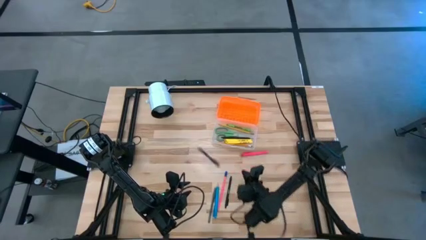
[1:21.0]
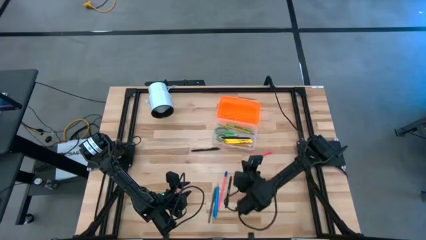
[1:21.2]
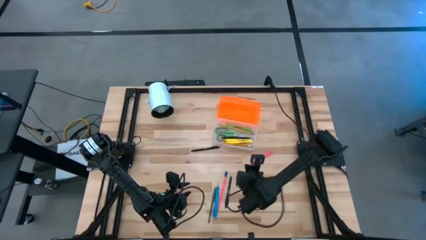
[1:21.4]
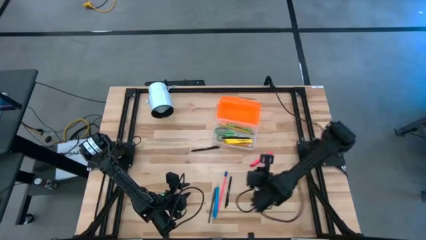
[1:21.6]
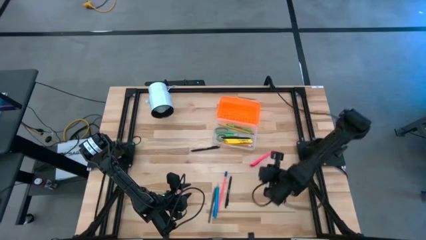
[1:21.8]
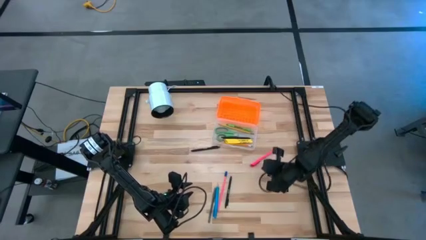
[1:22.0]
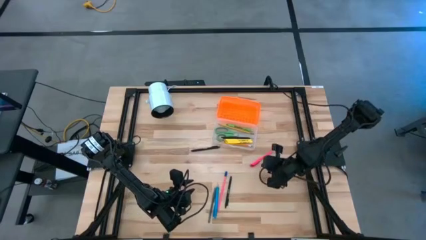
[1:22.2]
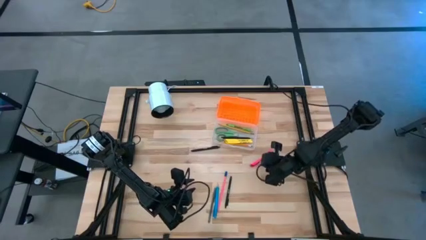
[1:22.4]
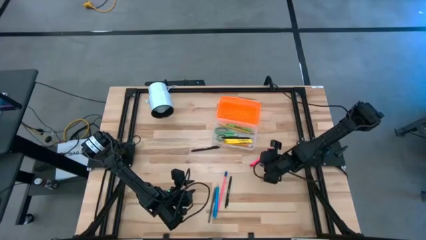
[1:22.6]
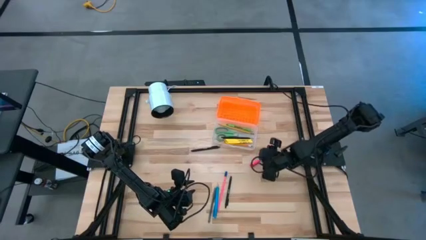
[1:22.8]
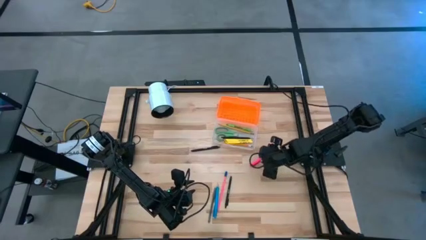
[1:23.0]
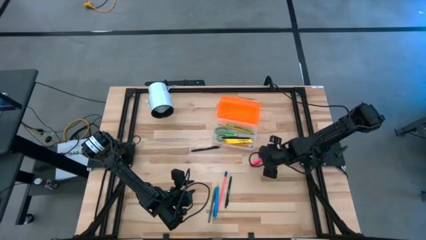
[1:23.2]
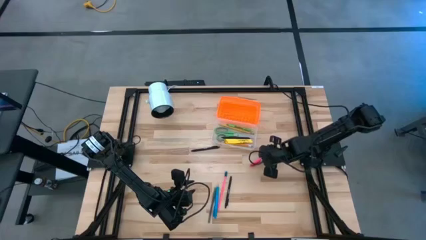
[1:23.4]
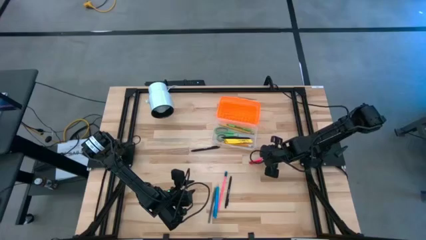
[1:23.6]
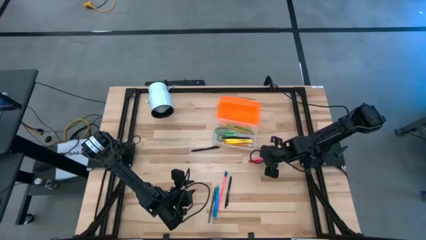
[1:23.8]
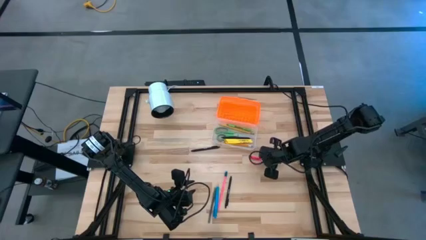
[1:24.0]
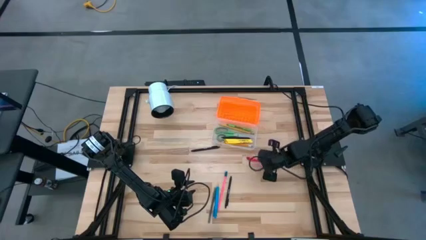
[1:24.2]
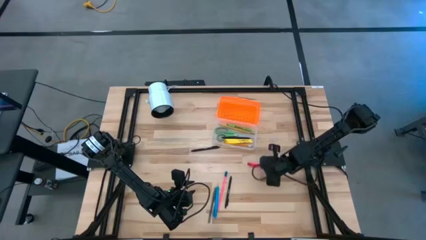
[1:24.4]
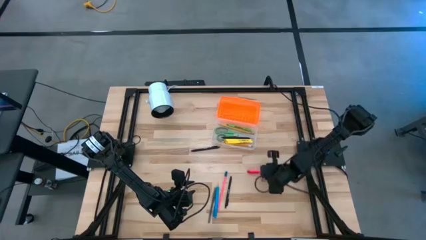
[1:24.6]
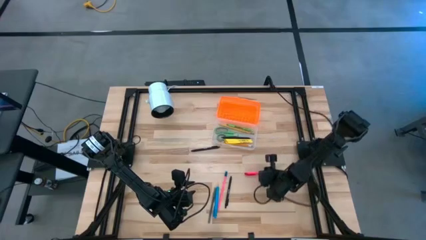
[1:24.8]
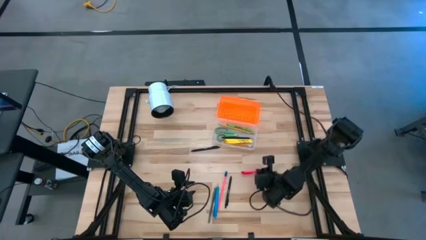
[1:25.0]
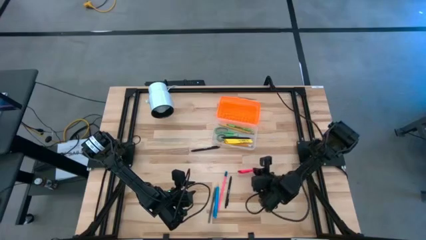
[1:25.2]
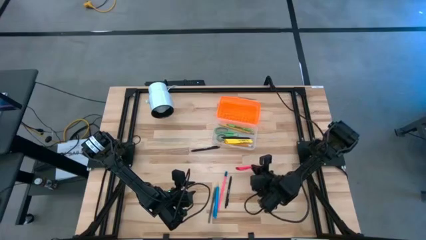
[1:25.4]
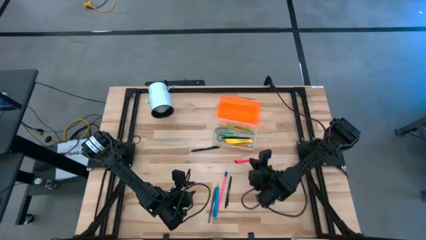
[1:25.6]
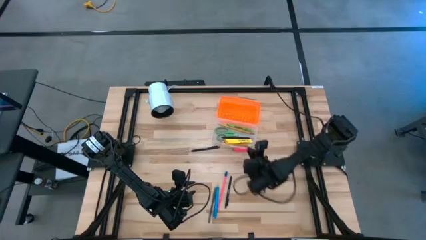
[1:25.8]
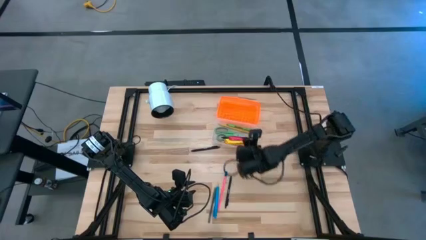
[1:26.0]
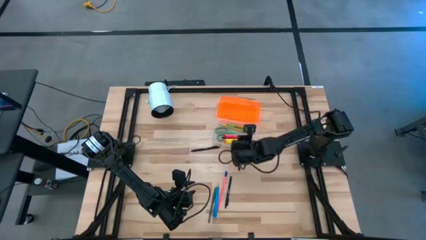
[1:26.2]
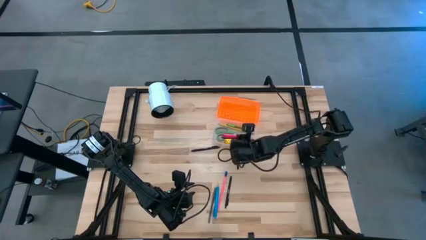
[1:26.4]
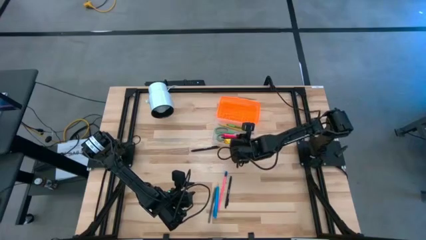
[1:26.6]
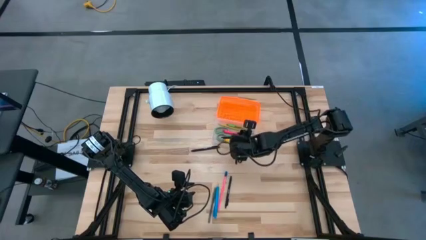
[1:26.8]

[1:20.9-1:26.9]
Task: Pick & place school supplies into a supply box
Put the pink pen into the supply box

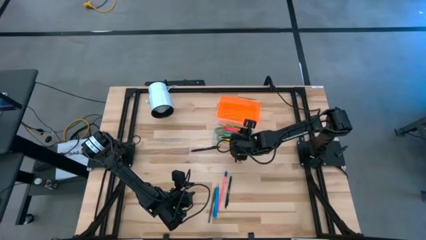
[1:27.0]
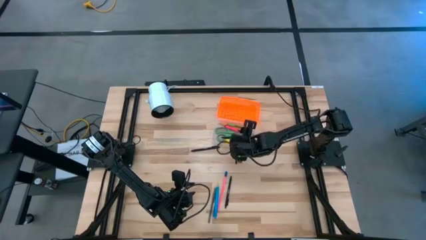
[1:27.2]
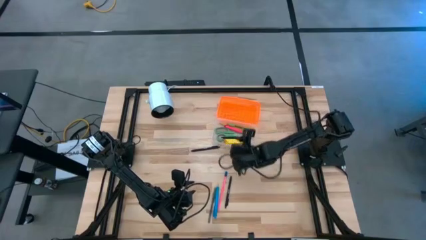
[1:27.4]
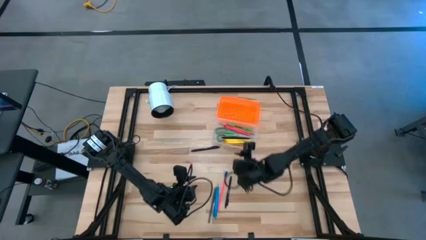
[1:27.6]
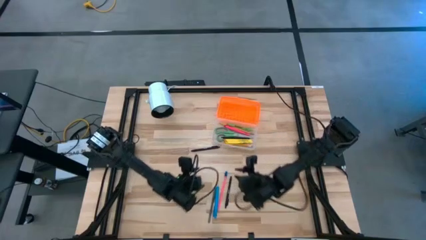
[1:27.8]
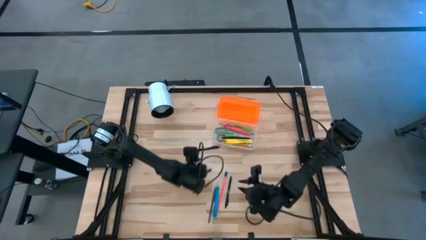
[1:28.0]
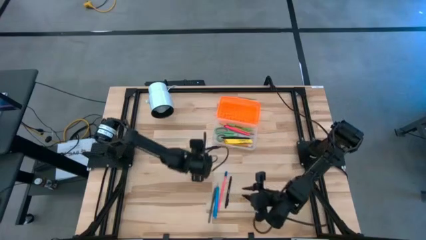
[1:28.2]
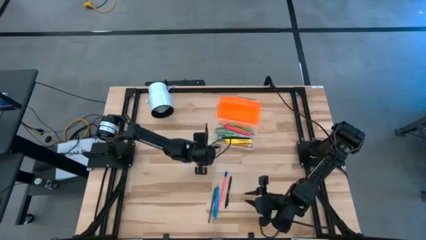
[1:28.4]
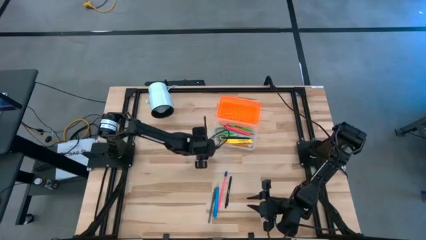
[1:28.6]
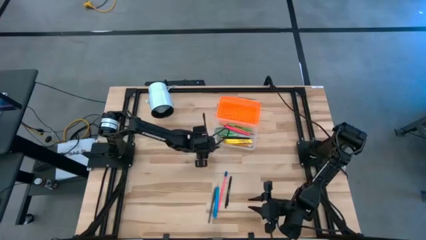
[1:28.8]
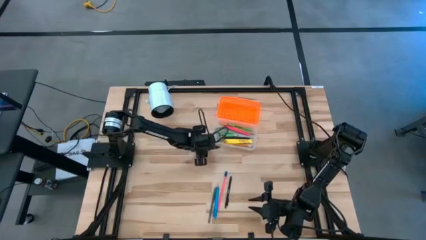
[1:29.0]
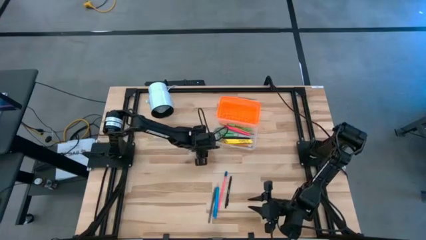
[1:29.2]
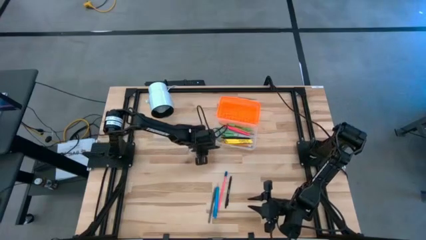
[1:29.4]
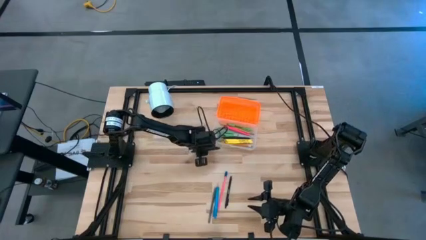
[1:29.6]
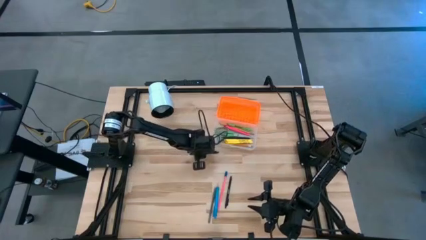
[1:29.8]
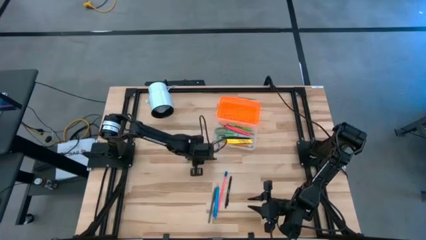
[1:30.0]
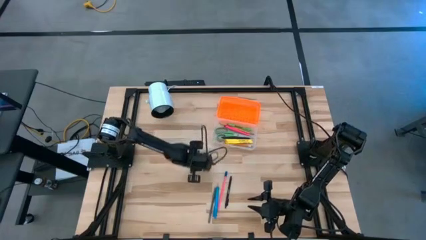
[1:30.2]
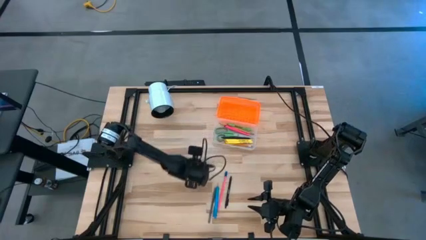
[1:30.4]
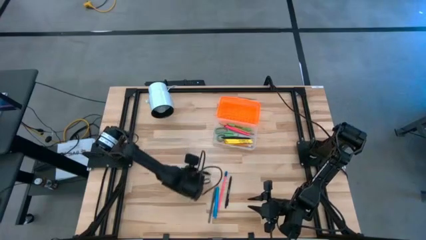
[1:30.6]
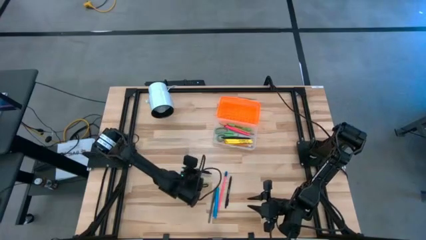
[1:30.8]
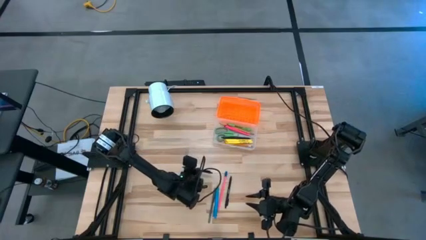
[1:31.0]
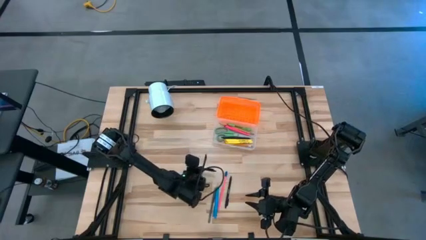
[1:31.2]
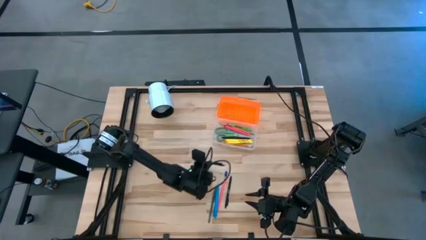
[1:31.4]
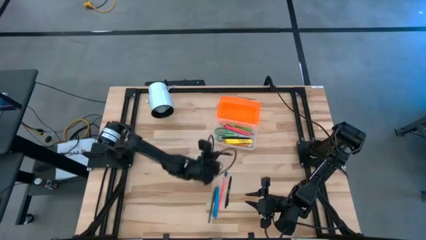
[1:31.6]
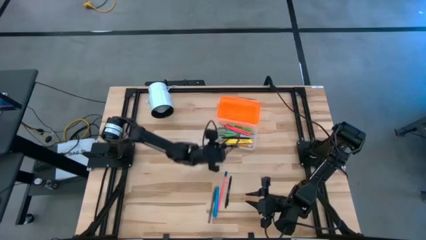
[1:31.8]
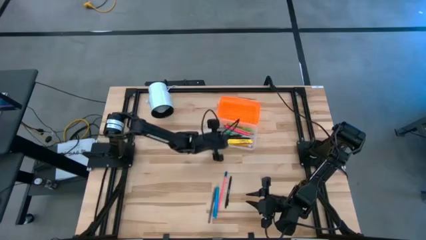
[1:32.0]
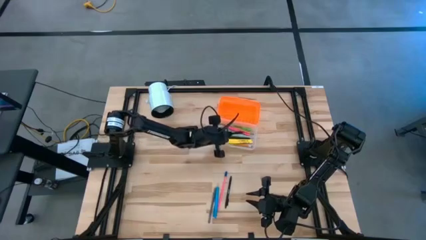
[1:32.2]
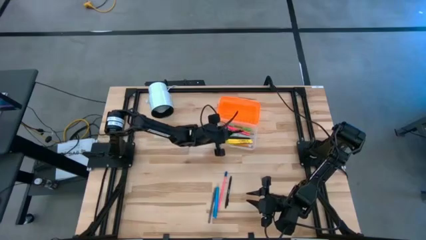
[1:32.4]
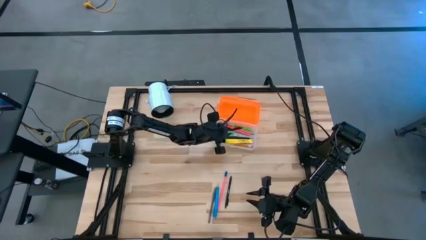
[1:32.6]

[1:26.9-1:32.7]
Put the top black pen into the supply box

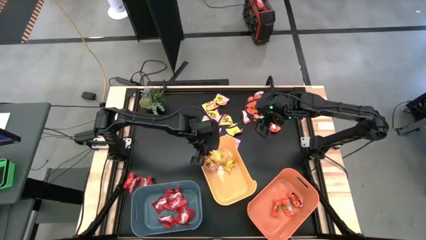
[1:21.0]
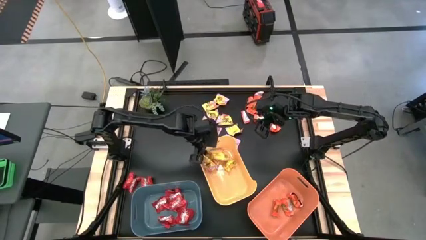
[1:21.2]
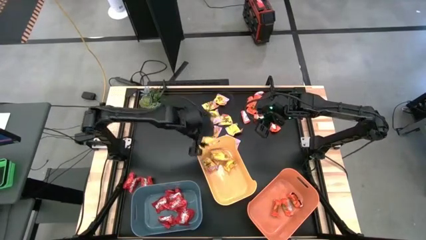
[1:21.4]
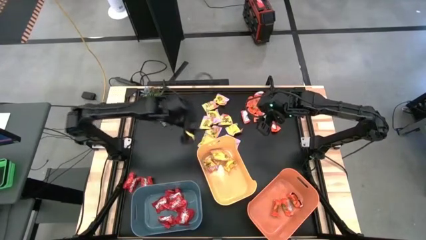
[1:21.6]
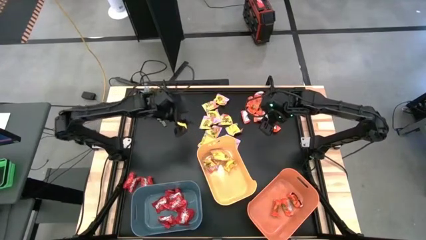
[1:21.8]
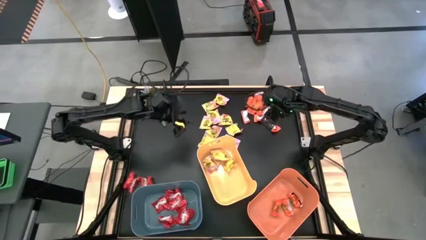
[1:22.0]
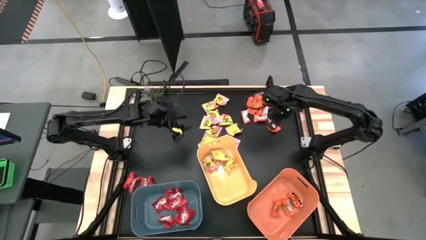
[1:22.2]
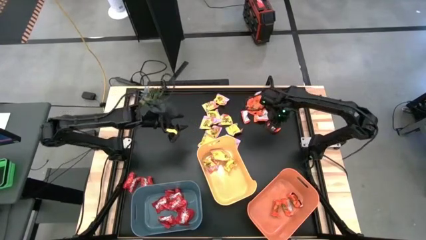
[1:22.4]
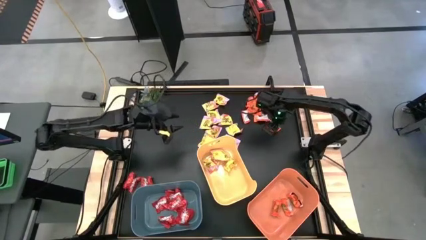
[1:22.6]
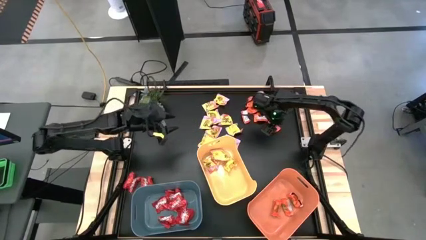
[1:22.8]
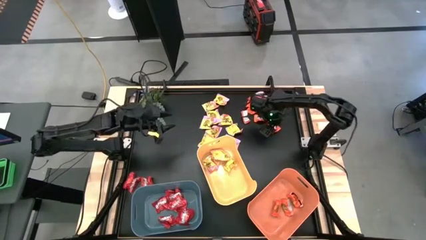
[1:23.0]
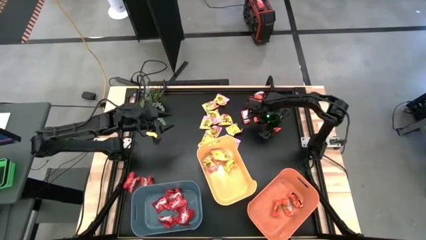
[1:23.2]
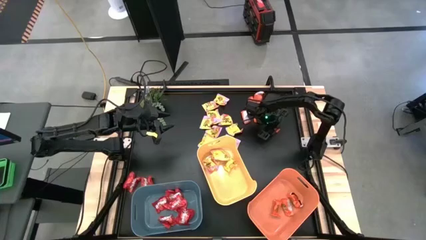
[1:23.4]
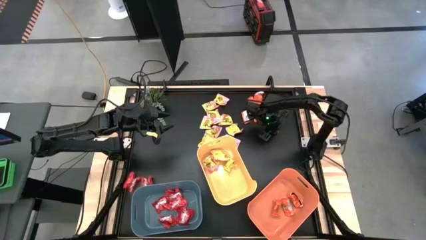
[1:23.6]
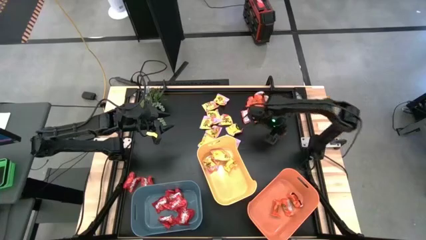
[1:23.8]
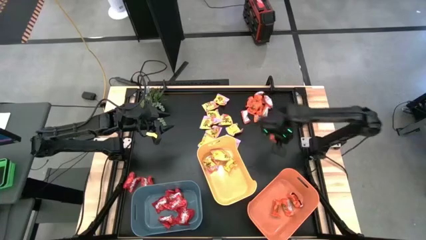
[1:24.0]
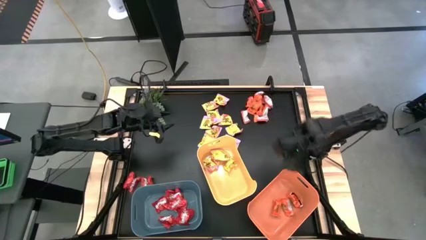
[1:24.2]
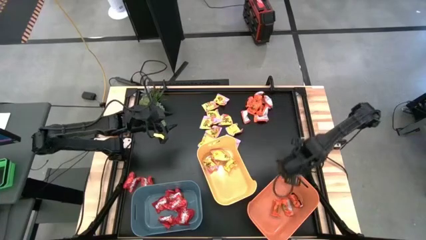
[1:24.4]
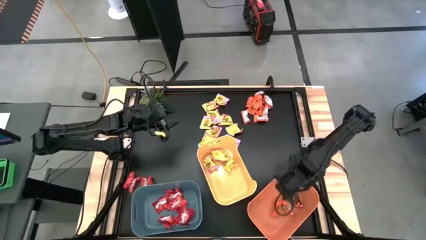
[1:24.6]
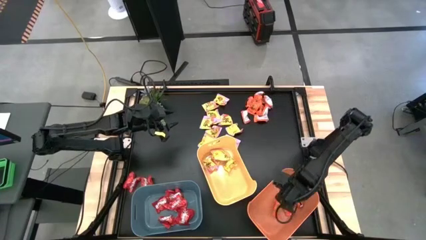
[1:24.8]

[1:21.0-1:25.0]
Task: Sort candy
Put the orange chocolate into the orange bin
